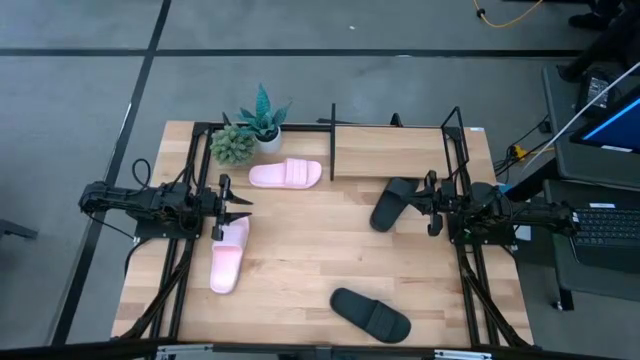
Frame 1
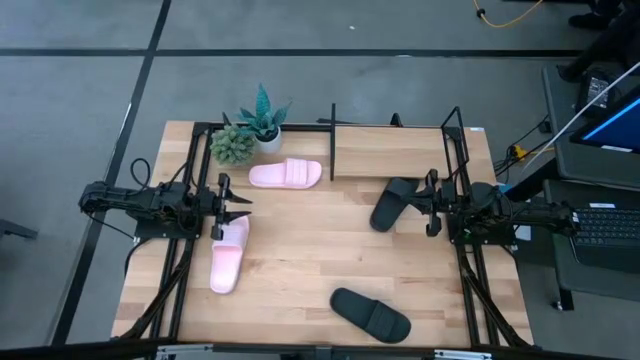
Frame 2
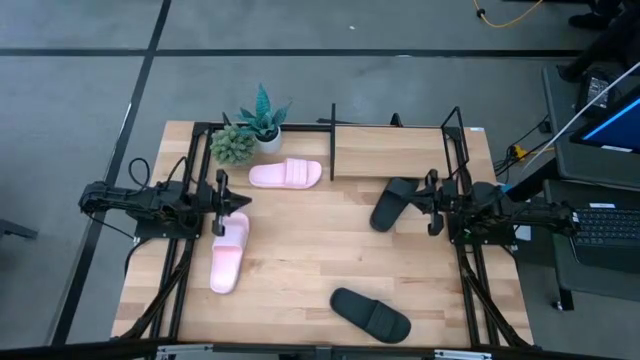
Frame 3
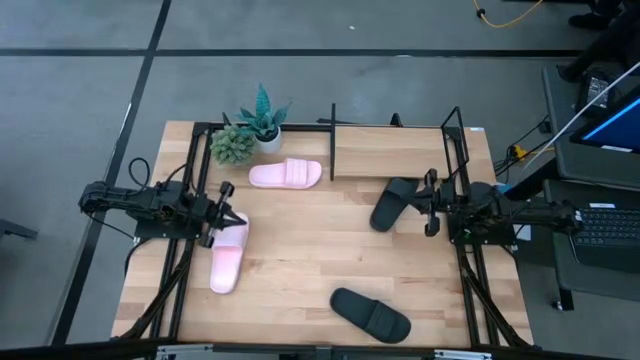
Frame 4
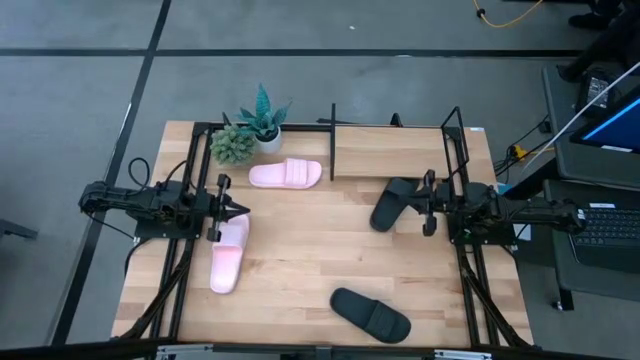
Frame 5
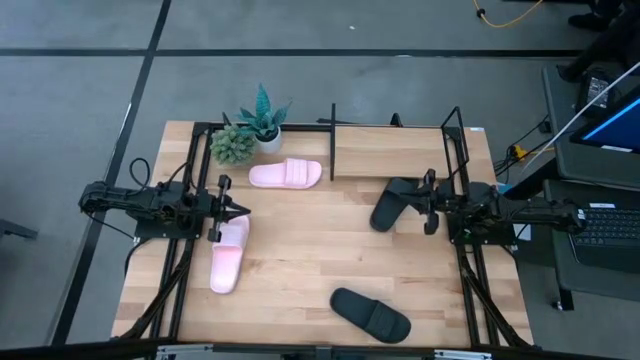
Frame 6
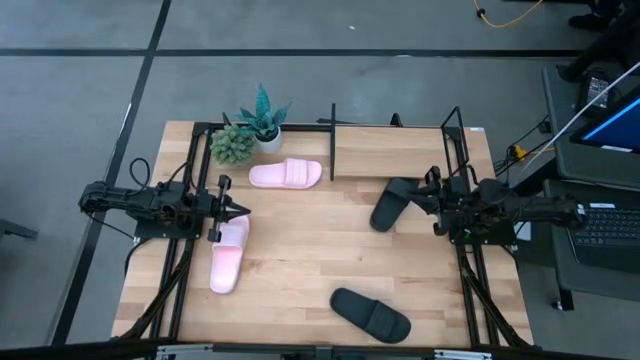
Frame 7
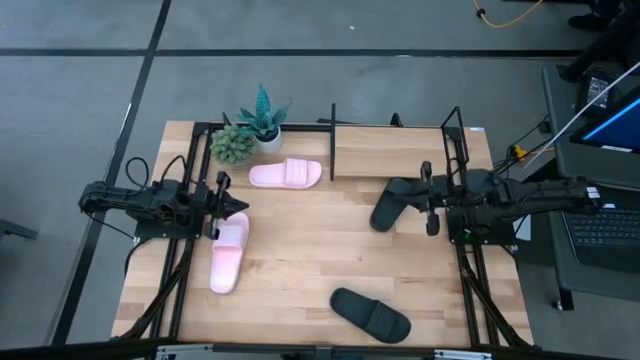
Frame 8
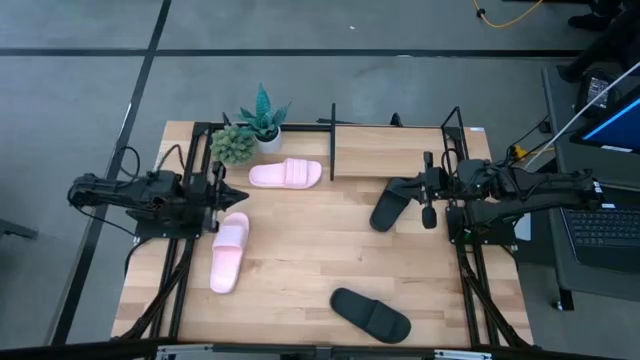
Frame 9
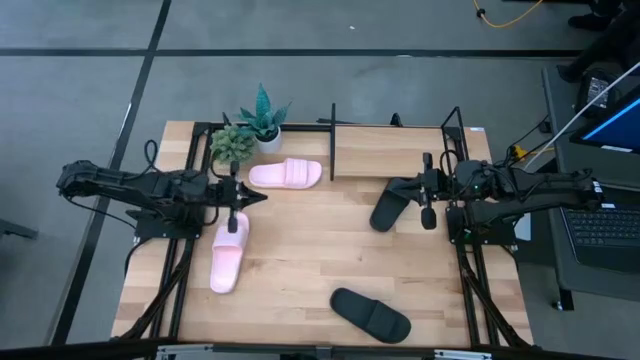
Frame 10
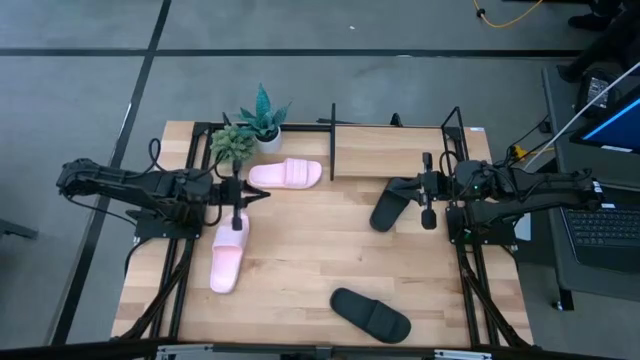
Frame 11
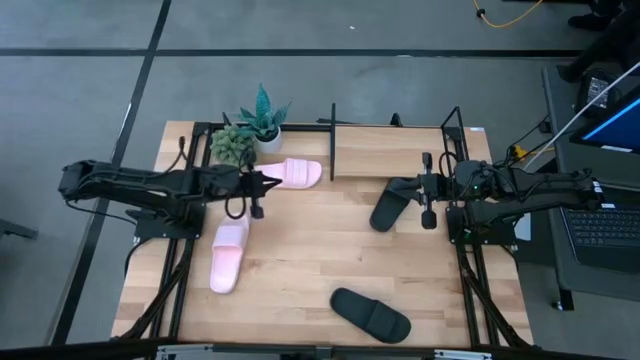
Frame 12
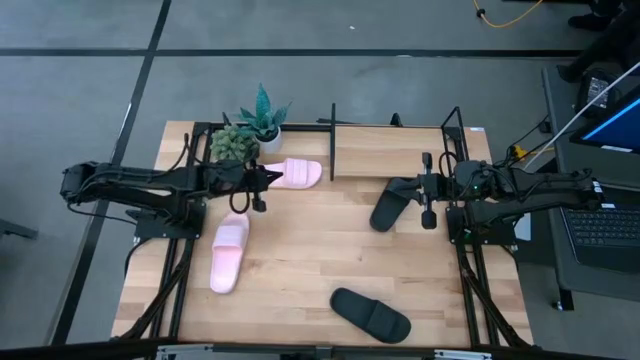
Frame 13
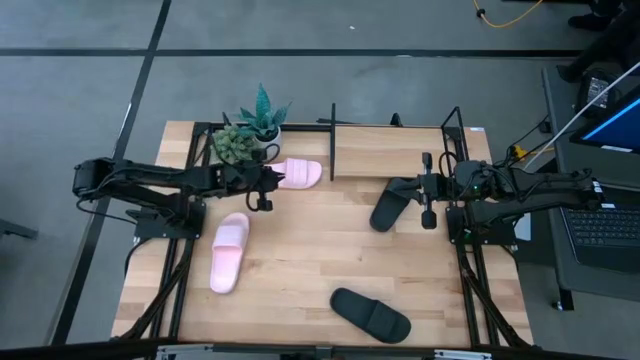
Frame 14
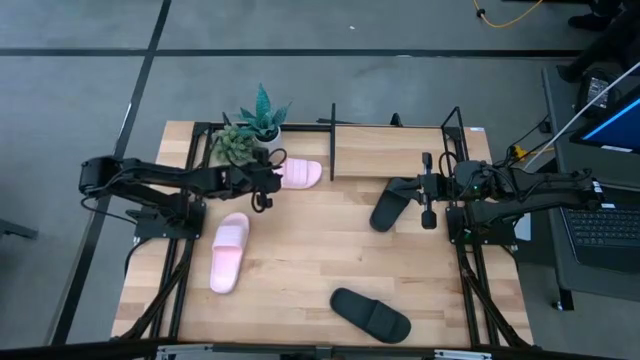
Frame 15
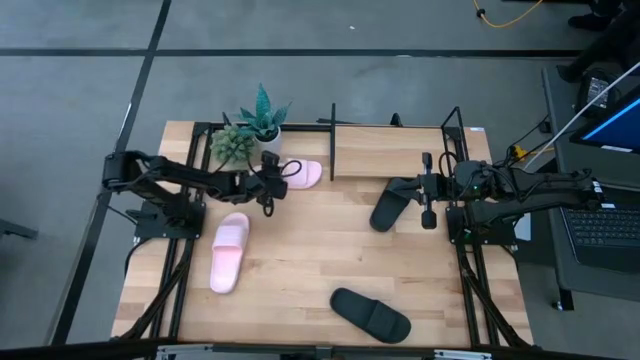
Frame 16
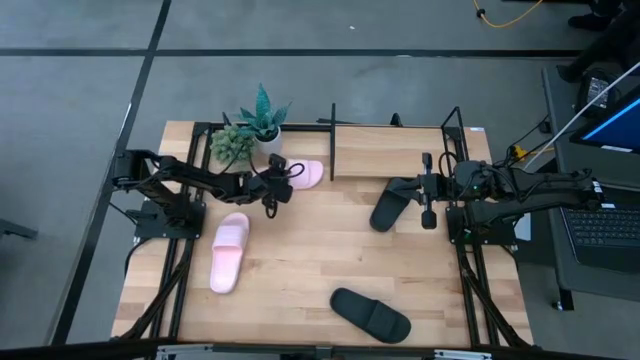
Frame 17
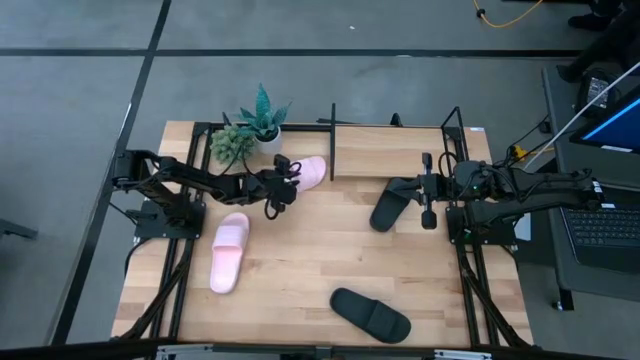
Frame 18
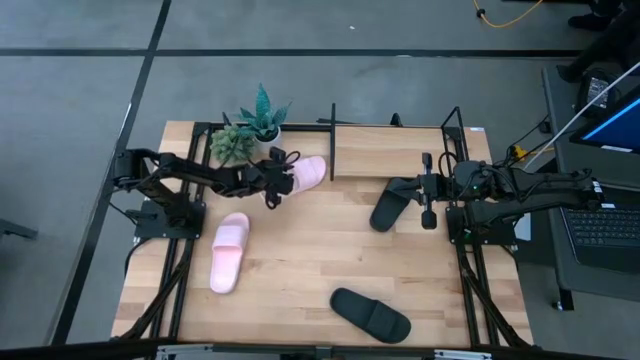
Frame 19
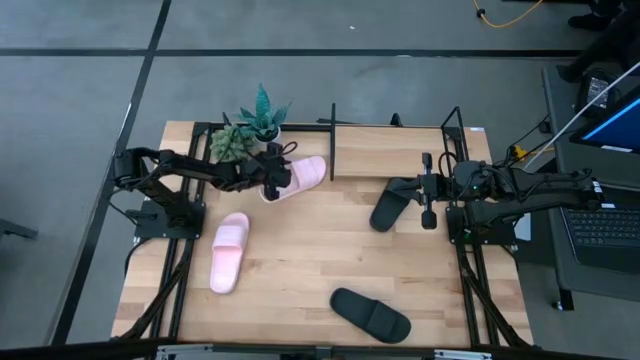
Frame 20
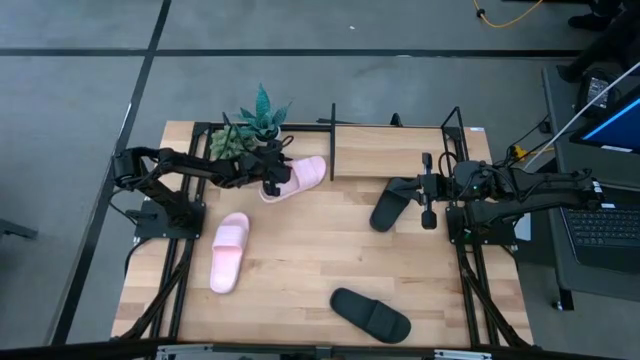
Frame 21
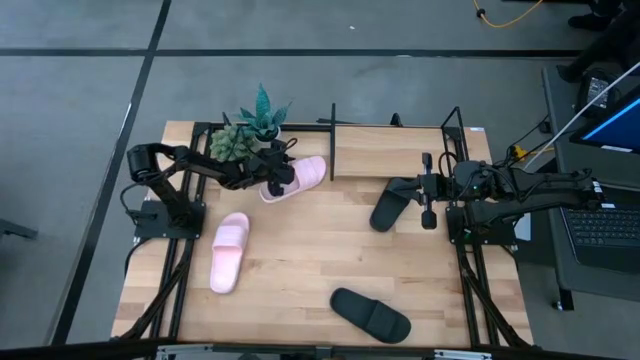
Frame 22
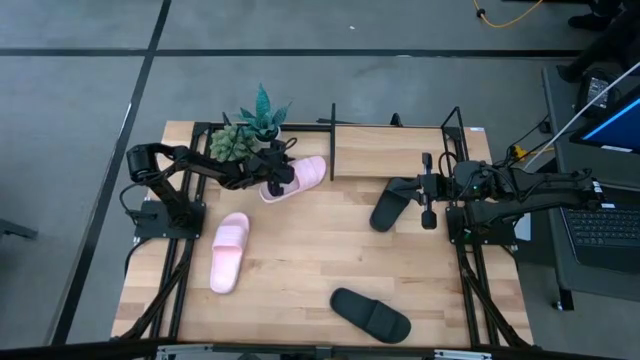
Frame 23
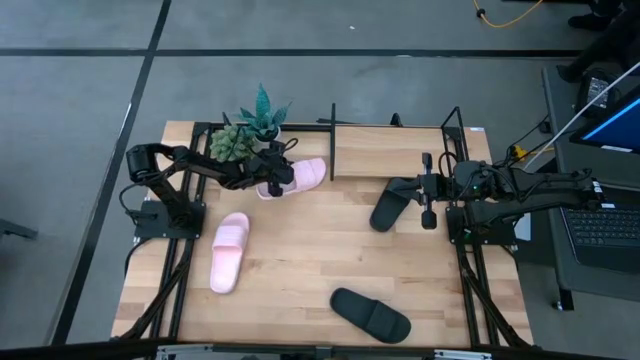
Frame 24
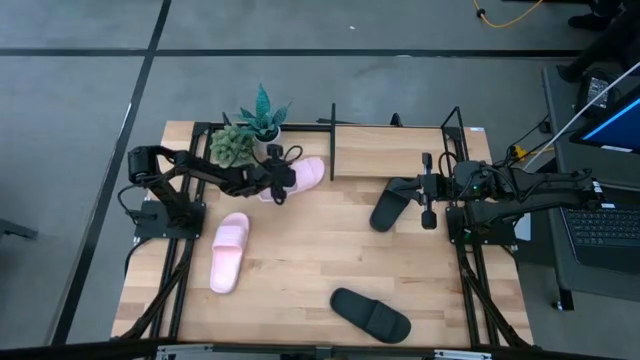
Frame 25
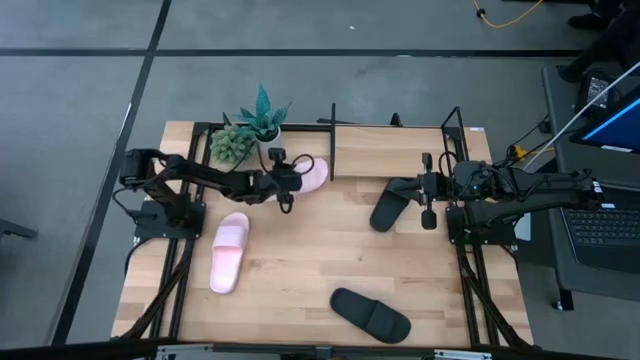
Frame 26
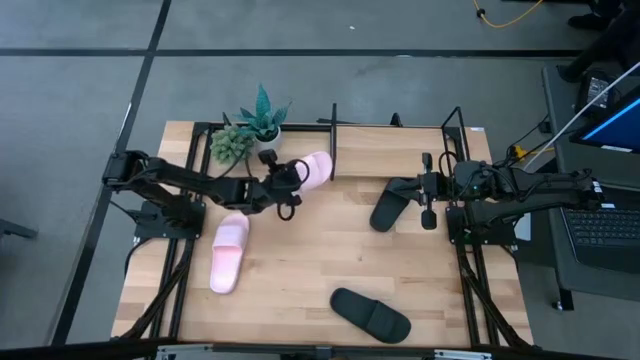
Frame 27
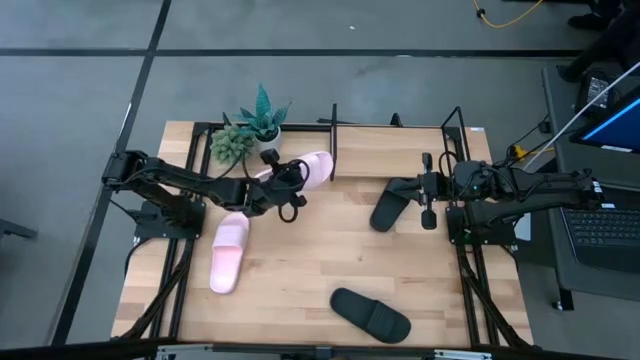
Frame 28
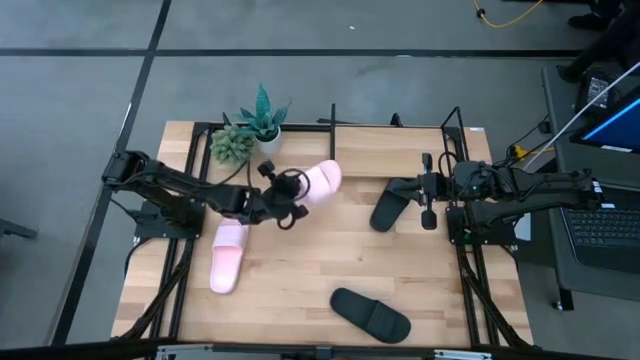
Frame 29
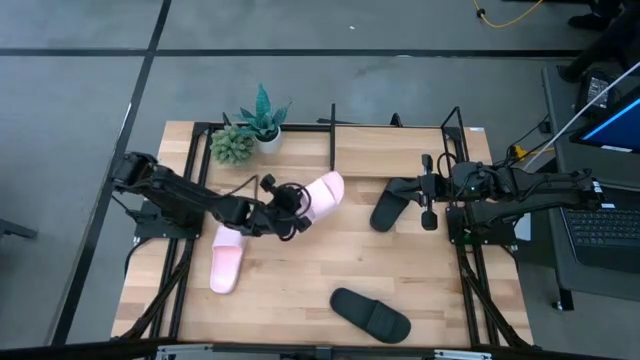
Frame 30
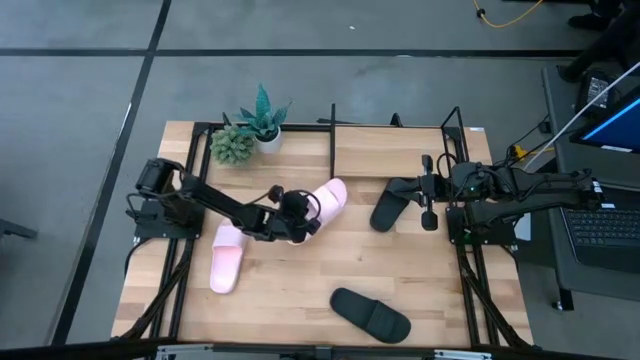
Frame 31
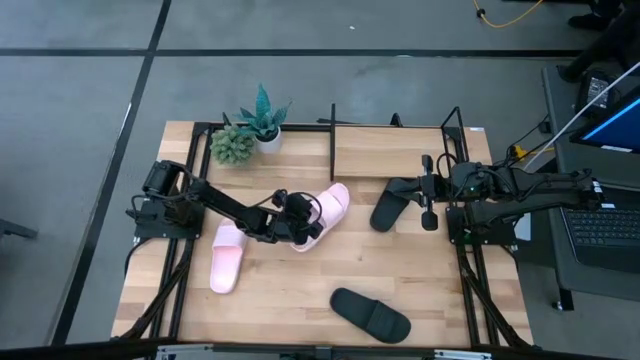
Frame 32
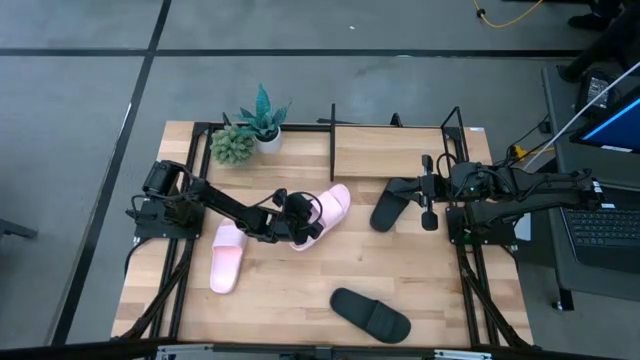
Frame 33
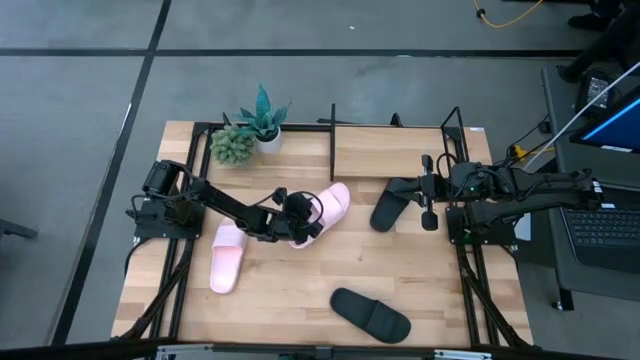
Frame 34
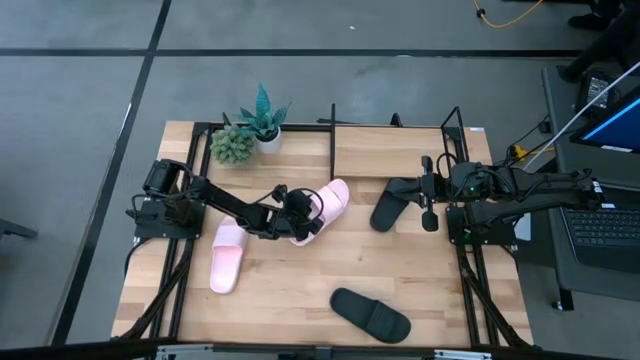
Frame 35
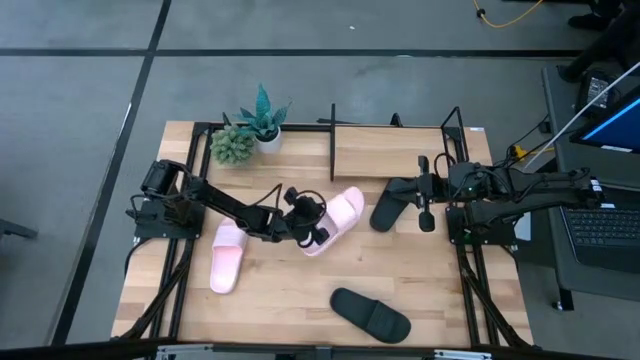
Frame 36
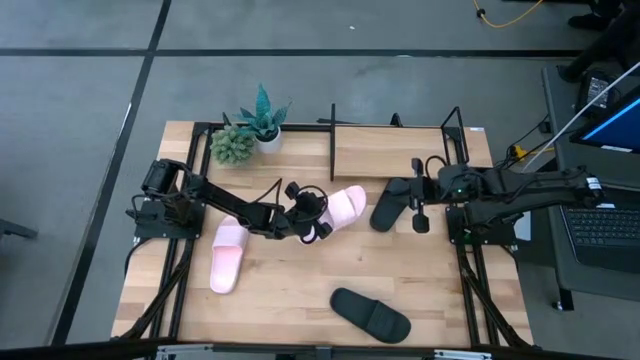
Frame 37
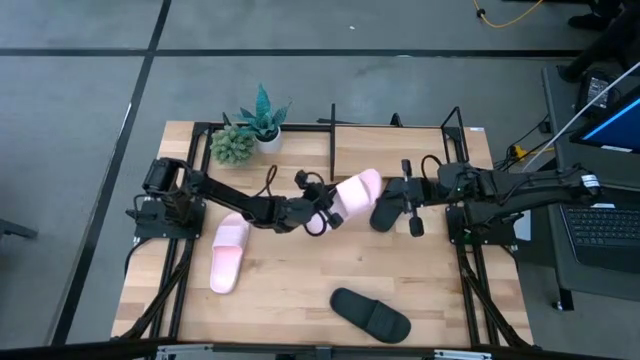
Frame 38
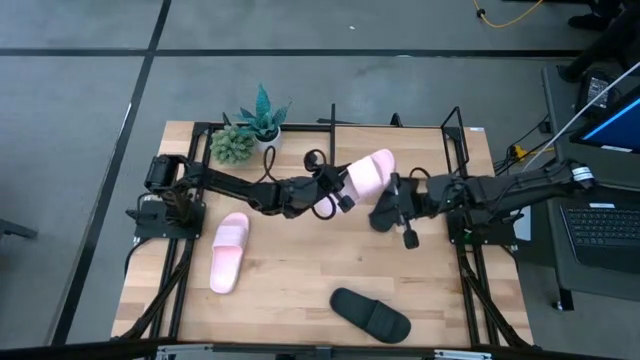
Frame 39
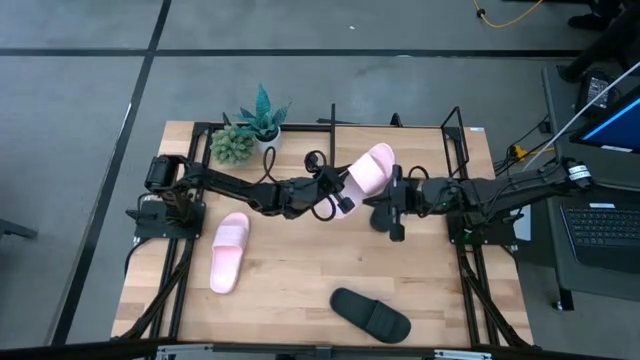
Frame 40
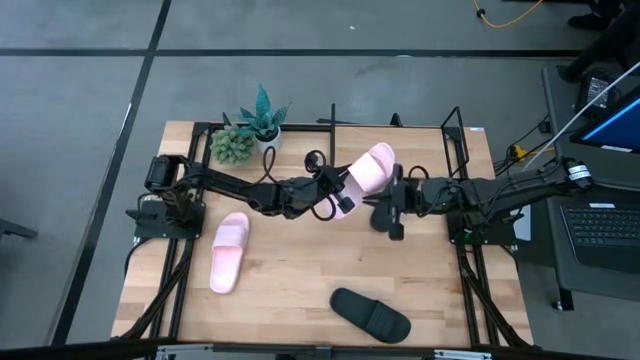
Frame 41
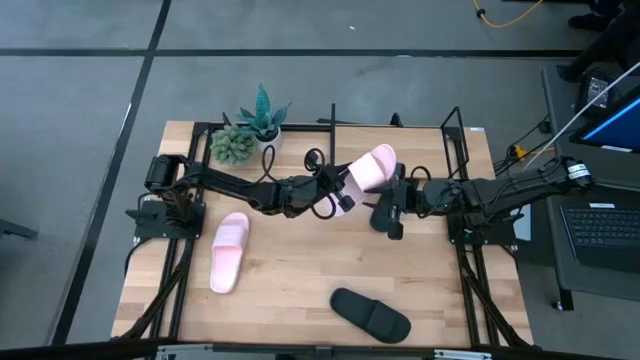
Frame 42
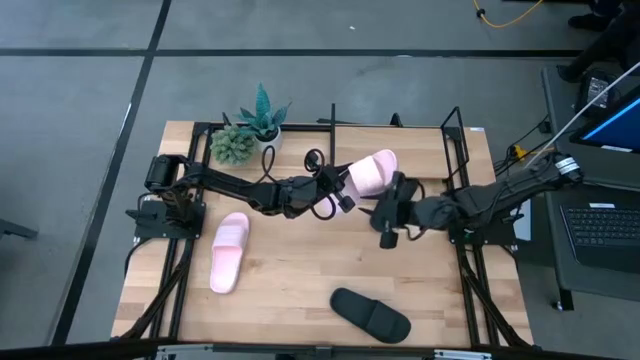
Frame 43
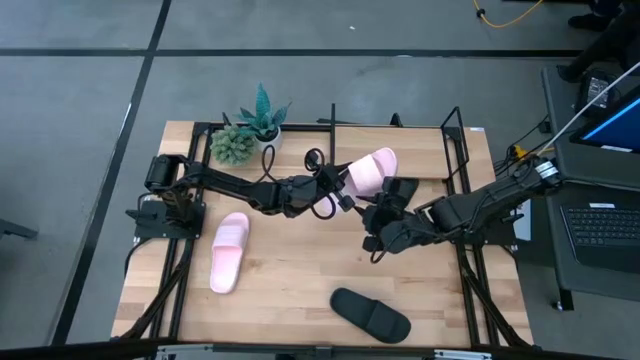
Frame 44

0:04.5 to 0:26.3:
Task: Pick and place slides into the shelf
Put the top pink slide on the shelf
